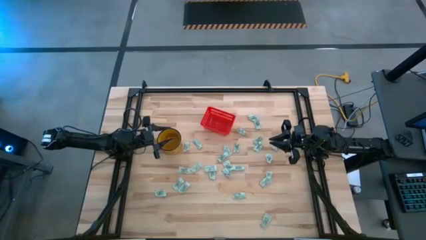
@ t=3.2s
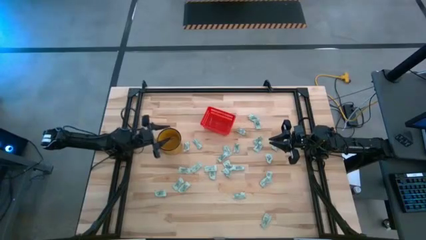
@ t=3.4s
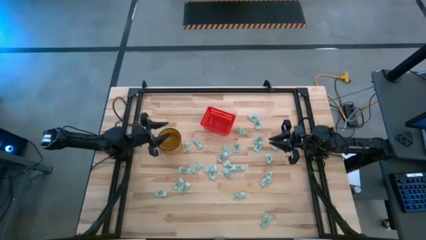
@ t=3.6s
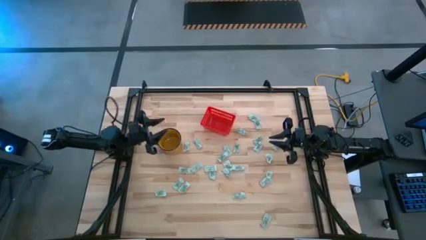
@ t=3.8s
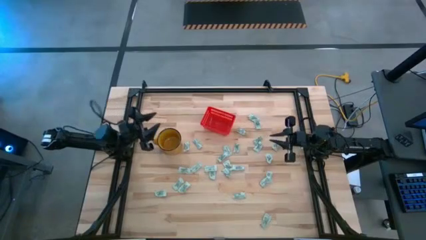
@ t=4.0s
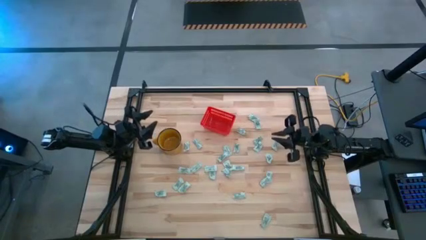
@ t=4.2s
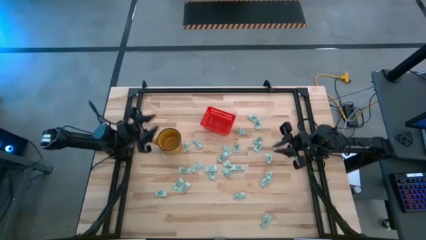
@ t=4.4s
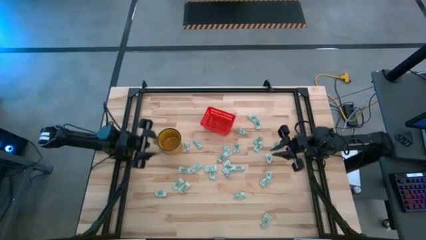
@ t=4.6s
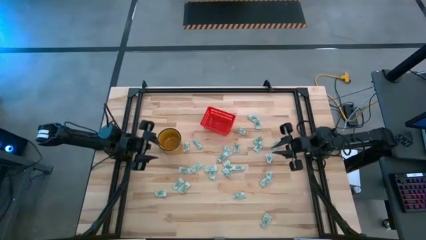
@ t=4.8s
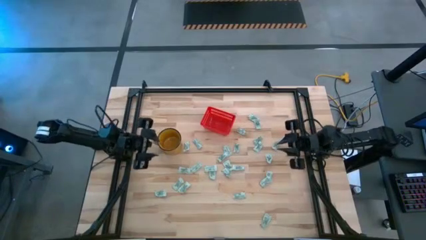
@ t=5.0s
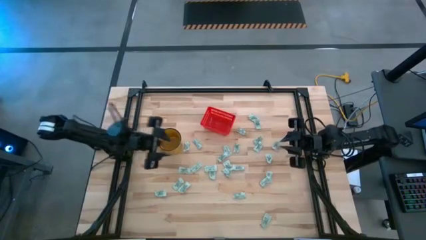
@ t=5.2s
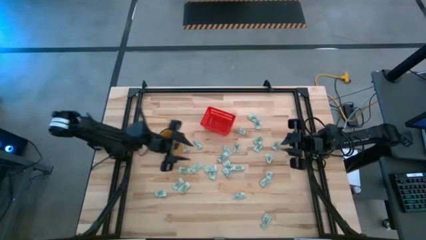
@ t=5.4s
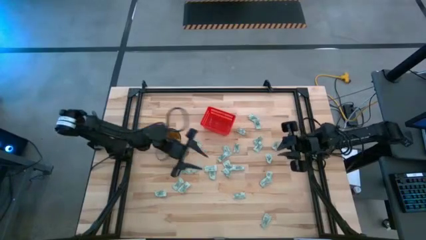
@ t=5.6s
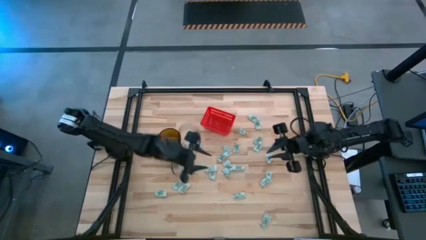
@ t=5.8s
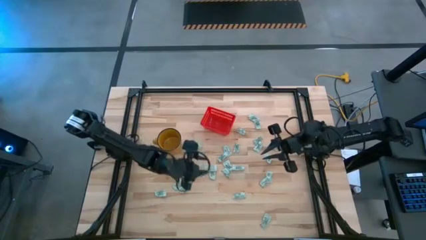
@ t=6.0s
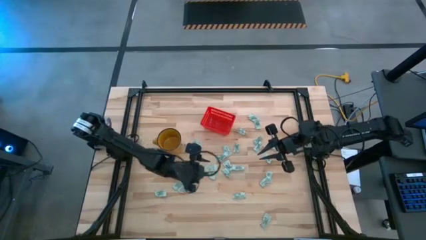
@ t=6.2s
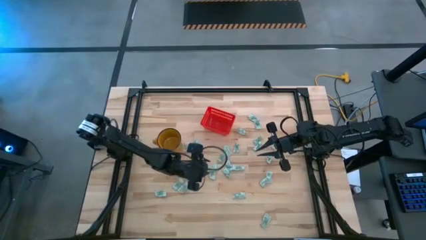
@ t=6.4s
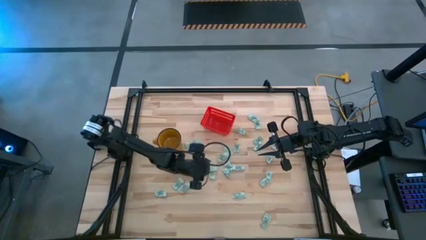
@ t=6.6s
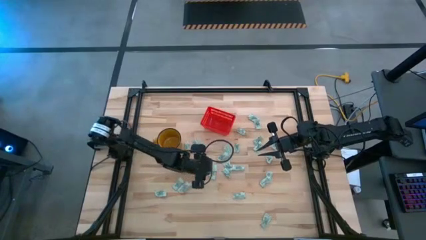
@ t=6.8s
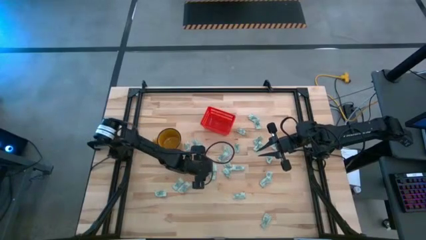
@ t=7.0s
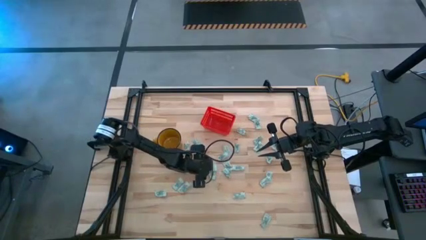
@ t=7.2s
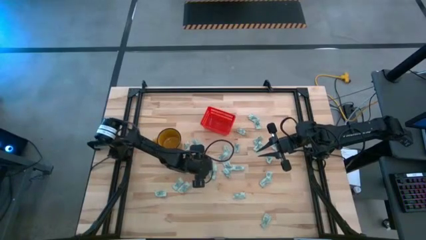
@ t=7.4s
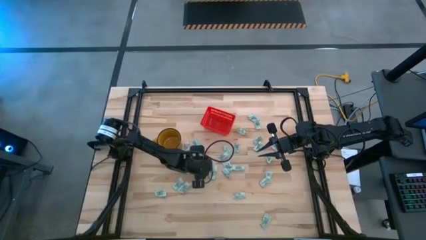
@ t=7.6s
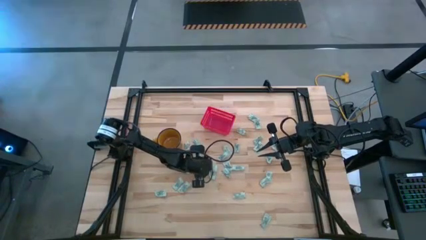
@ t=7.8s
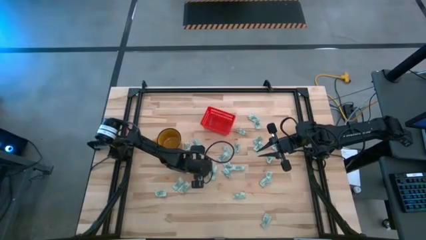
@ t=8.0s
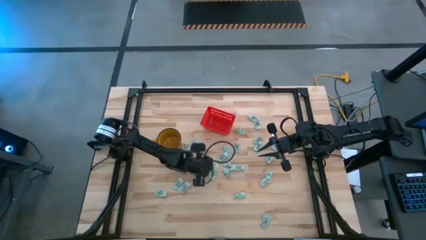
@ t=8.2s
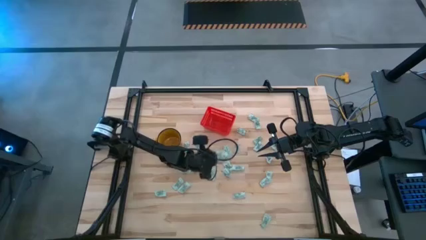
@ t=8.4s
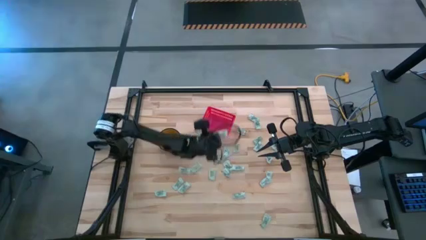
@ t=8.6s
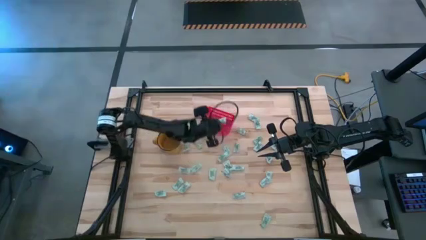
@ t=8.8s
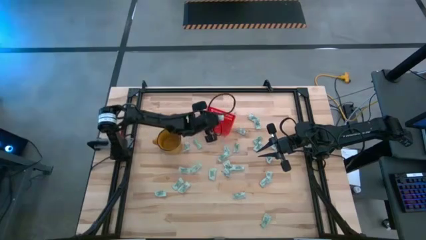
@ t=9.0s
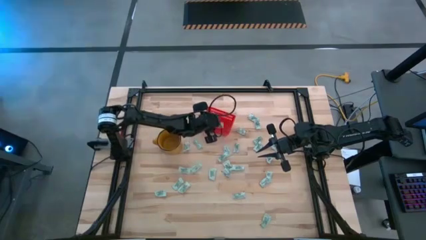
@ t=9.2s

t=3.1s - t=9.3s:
Task: Pick and place Stevia / Truvia into bins
Put the stevia packet into the red basket

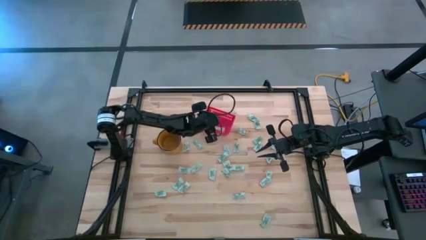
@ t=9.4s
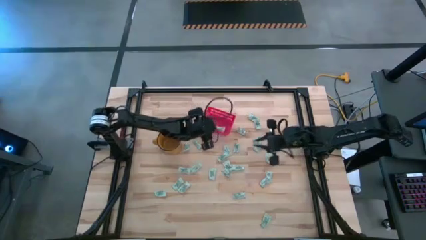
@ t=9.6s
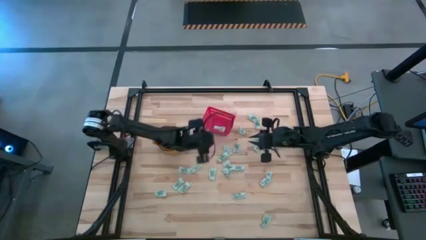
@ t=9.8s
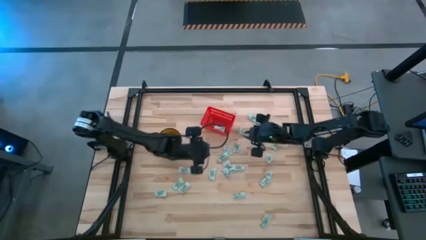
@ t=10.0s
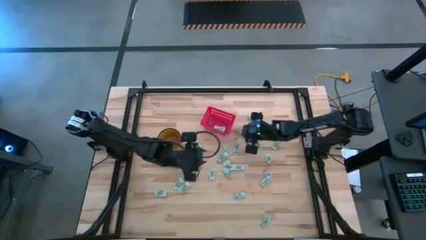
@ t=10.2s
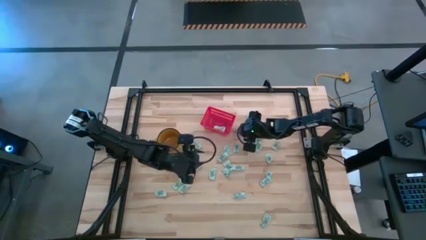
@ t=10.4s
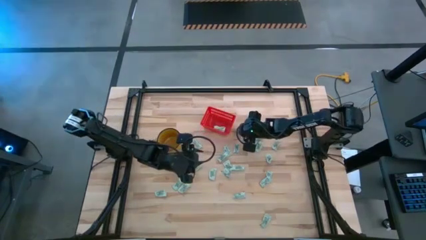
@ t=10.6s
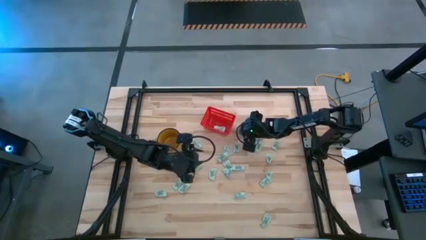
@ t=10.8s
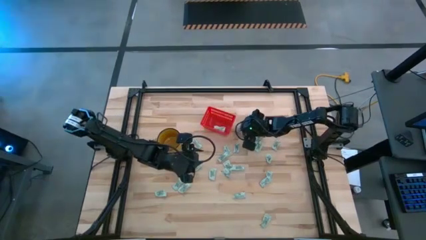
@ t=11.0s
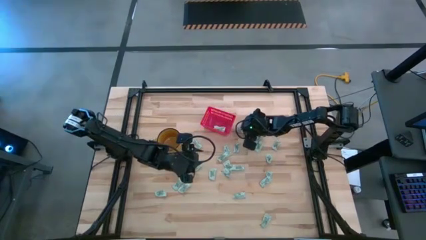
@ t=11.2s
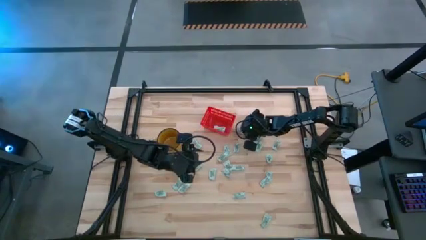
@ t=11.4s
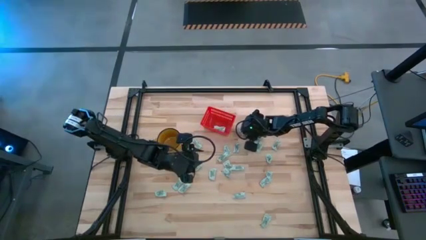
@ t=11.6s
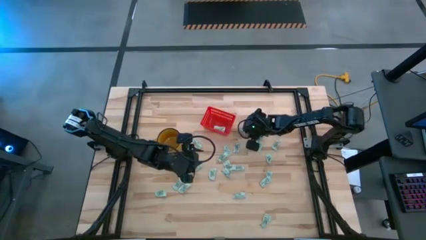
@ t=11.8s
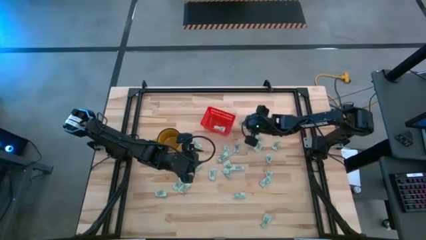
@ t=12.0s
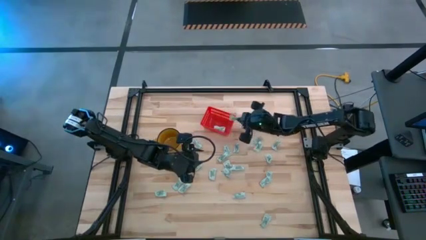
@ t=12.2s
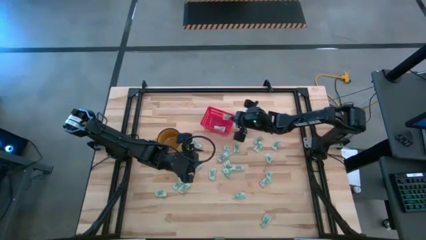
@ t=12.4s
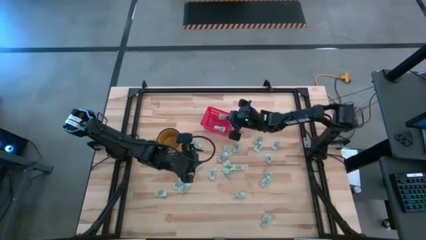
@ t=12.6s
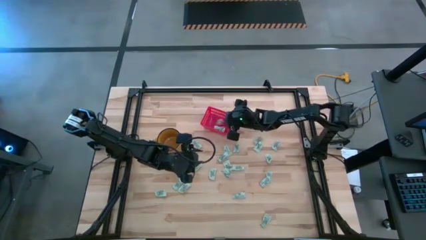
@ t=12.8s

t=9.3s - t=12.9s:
Put the stevia packet into the red basket

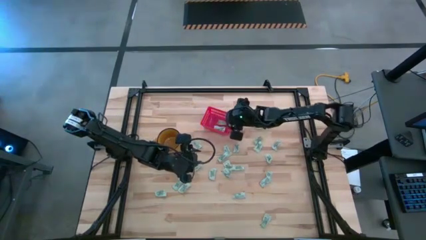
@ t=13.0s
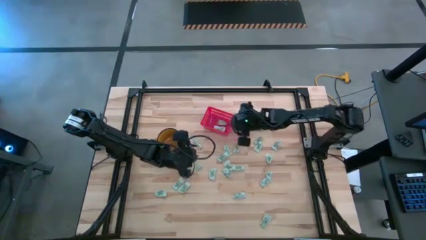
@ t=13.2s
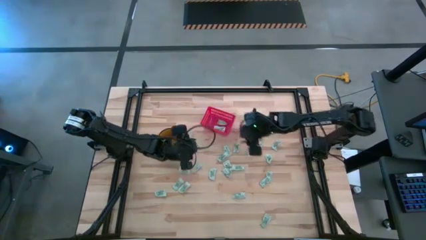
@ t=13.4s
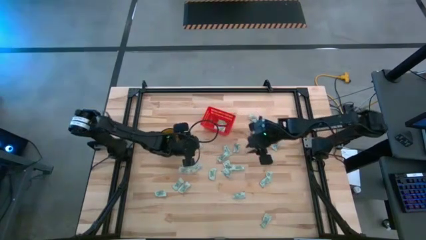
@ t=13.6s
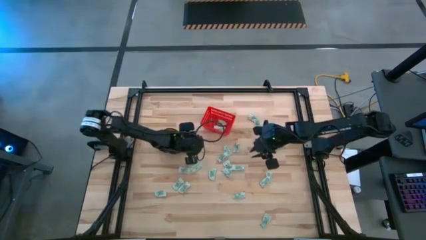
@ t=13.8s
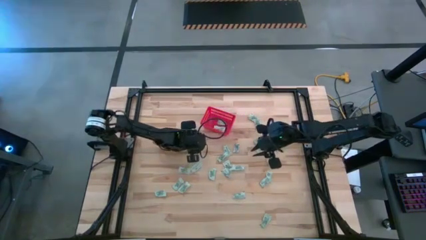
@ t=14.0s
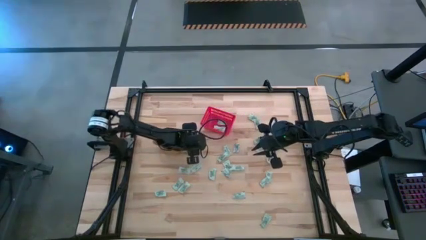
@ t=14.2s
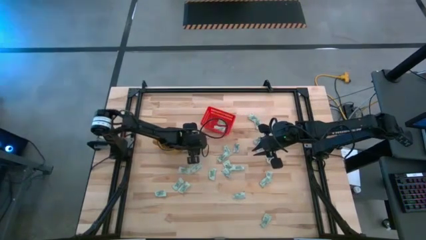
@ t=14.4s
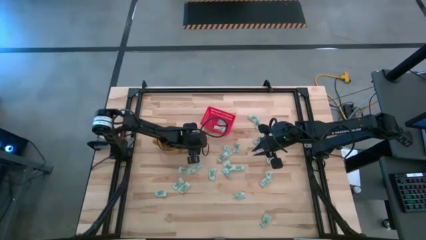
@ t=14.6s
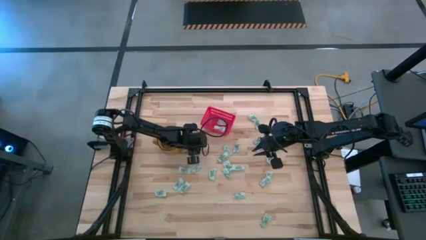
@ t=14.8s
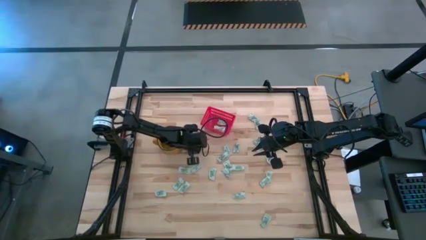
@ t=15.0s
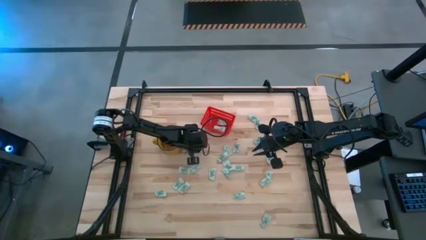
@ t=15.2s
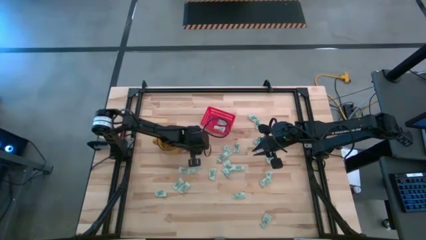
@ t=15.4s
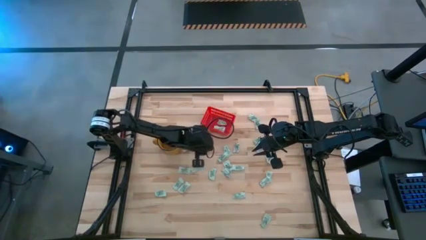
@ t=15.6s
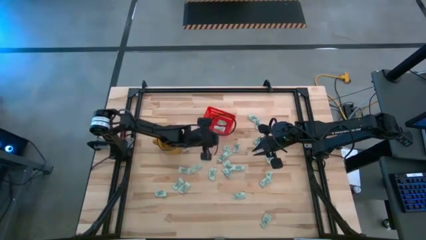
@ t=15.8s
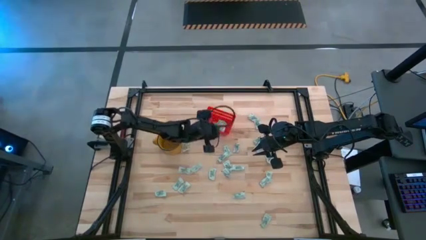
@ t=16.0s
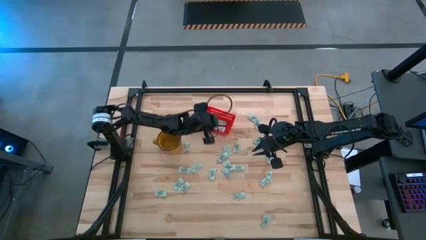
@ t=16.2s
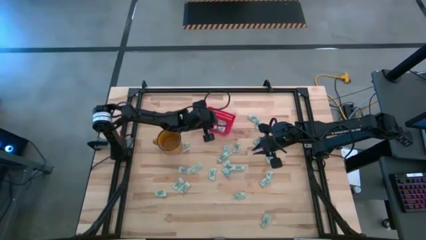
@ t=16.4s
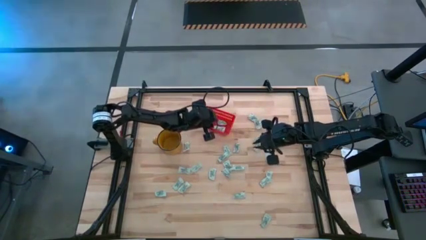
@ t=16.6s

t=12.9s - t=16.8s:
Put the stevia packet into the red basket

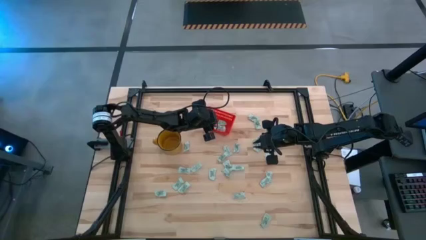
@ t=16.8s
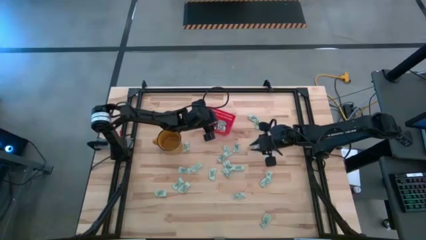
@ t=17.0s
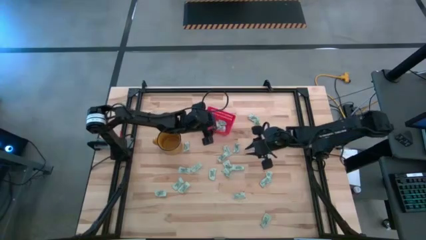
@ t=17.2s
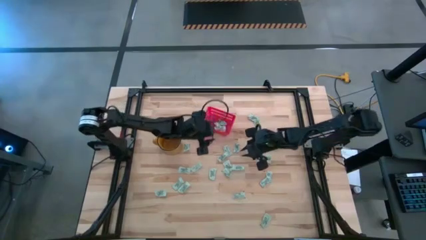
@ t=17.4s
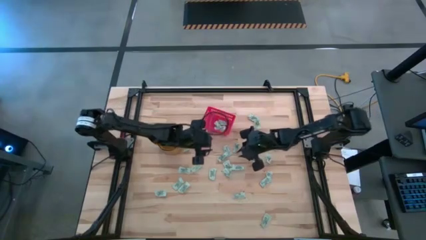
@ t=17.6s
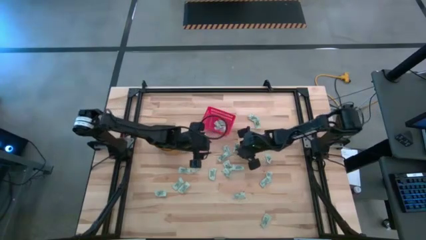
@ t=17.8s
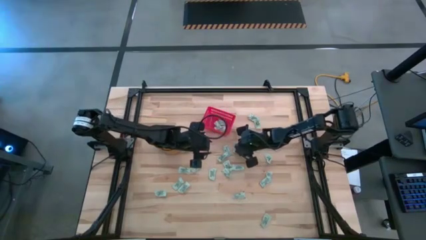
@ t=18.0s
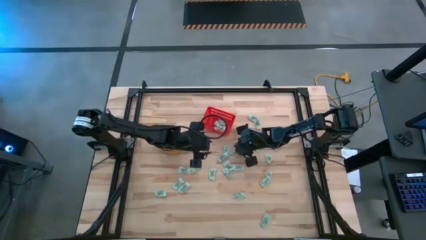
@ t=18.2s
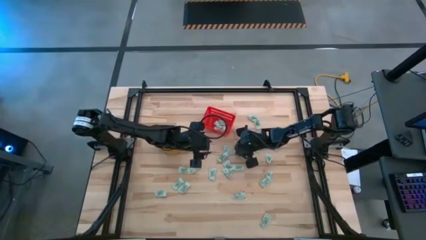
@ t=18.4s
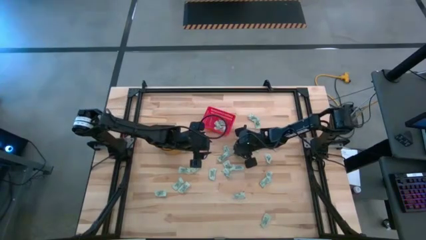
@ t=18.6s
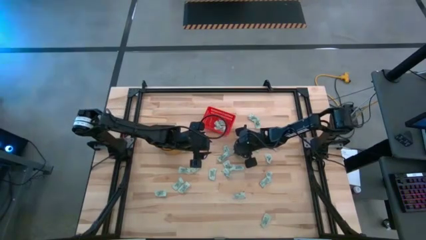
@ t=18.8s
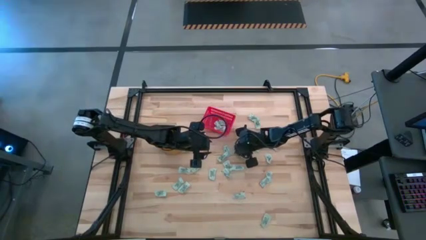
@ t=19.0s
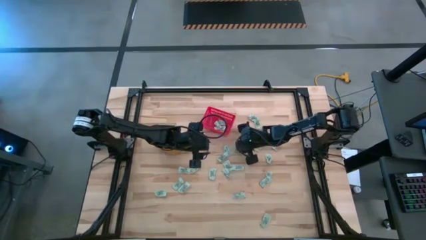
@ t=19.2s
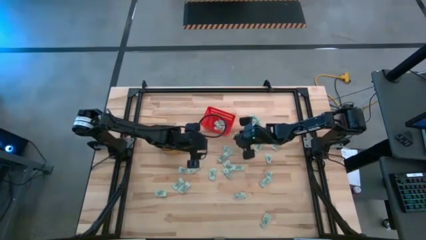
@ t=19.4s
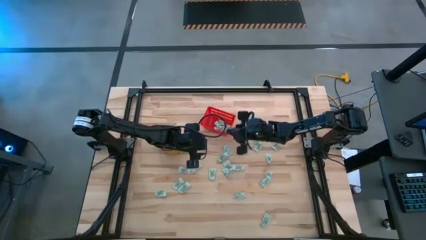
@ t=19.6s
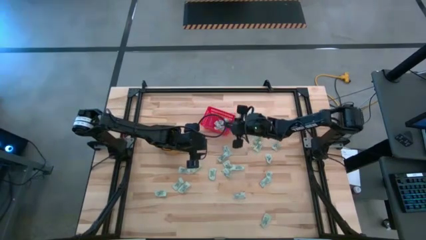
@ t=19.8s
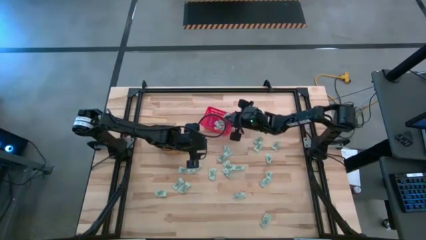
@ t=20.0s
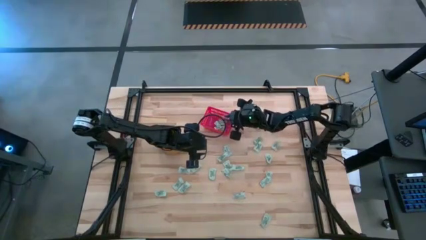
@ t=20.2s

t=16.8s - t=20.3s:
Put the stevia packet into the red basket
